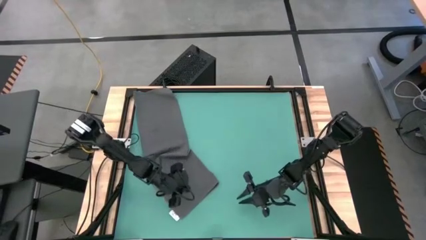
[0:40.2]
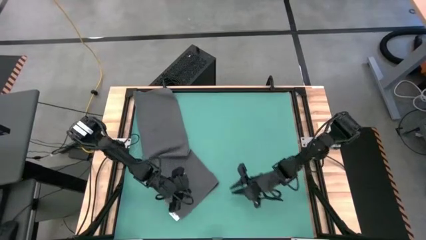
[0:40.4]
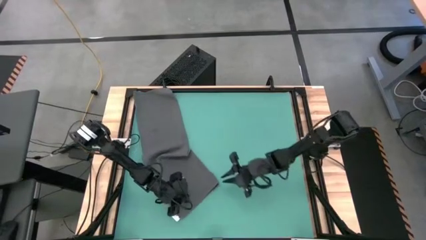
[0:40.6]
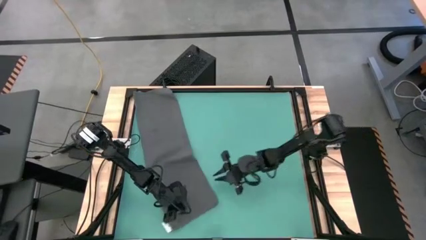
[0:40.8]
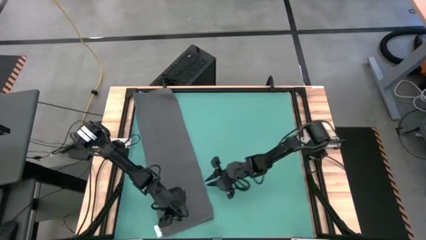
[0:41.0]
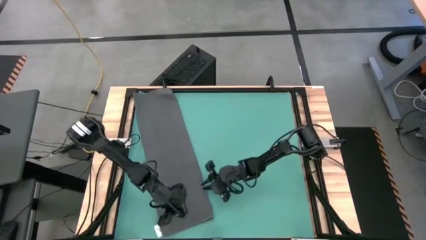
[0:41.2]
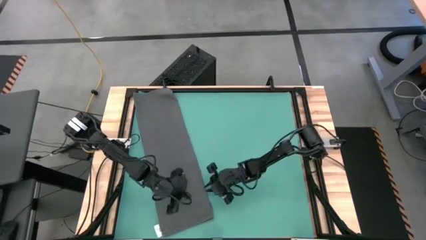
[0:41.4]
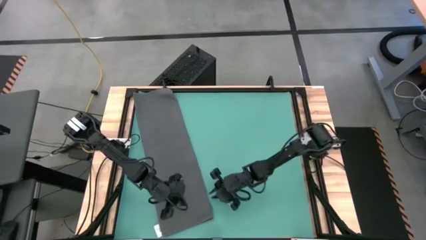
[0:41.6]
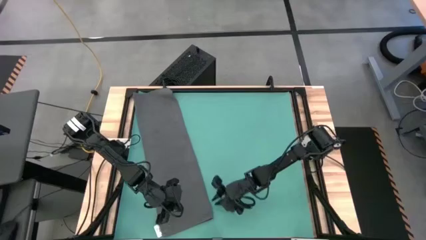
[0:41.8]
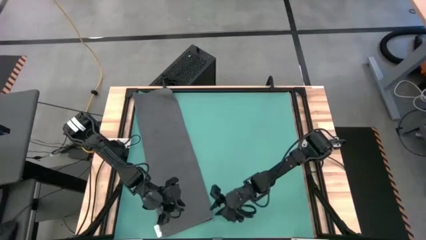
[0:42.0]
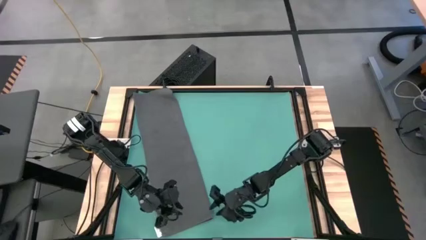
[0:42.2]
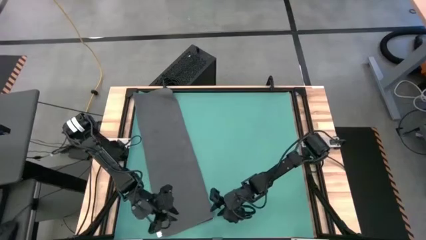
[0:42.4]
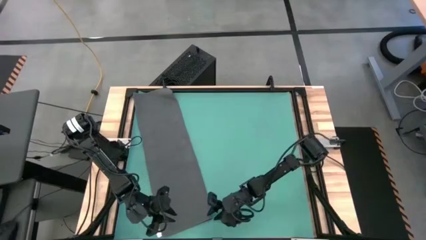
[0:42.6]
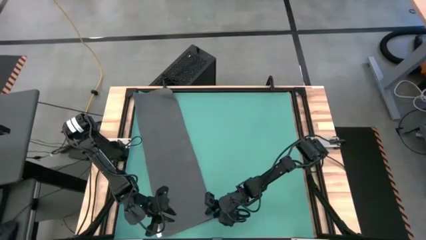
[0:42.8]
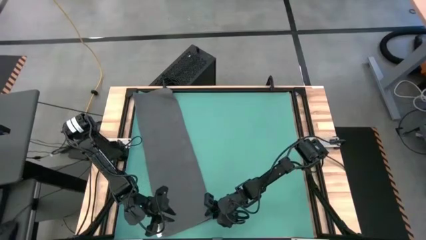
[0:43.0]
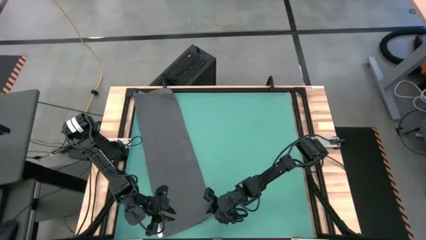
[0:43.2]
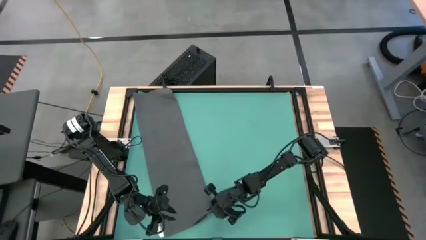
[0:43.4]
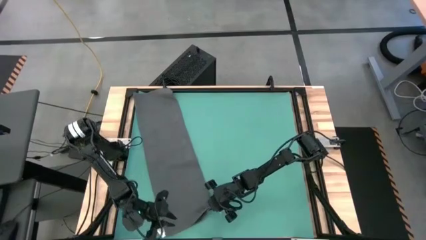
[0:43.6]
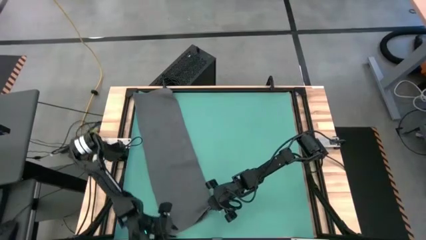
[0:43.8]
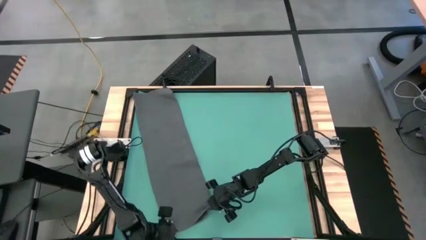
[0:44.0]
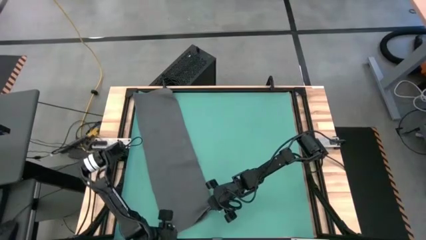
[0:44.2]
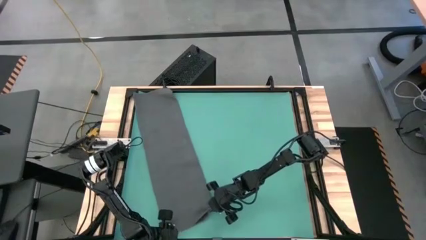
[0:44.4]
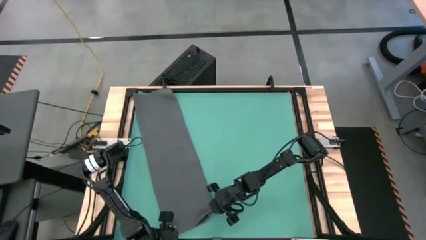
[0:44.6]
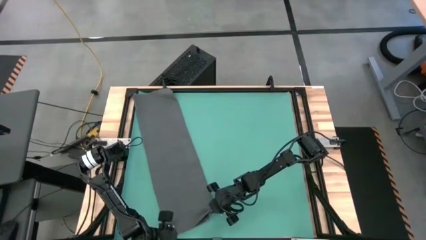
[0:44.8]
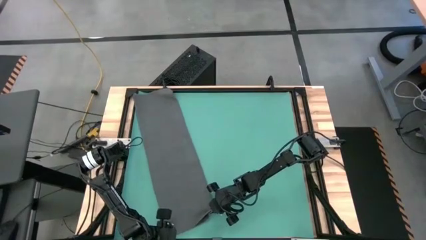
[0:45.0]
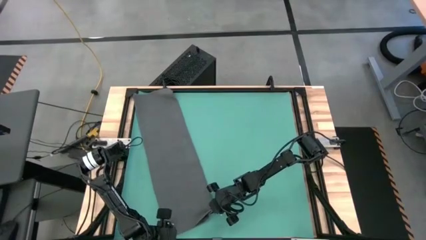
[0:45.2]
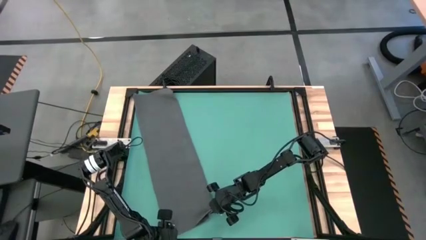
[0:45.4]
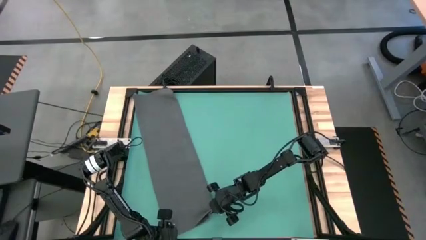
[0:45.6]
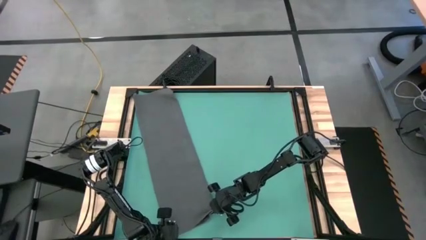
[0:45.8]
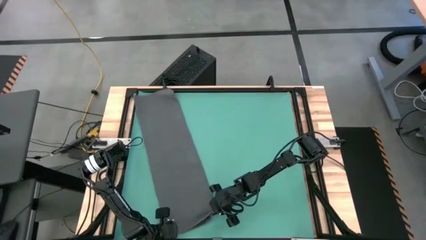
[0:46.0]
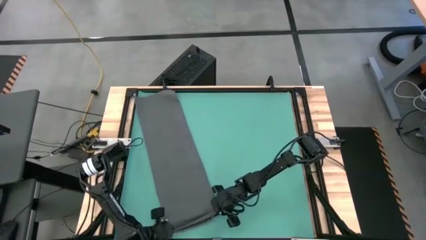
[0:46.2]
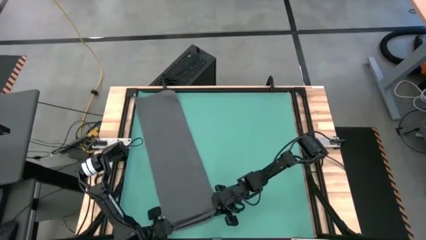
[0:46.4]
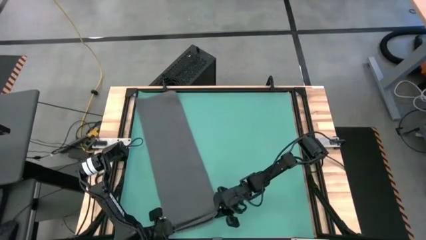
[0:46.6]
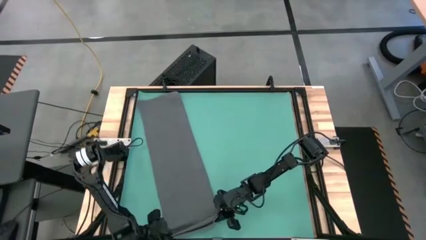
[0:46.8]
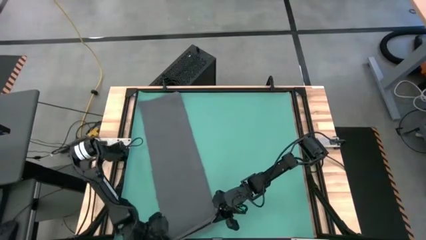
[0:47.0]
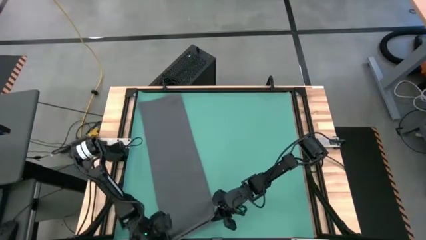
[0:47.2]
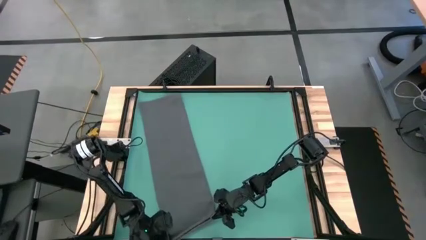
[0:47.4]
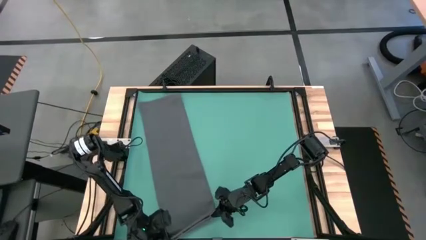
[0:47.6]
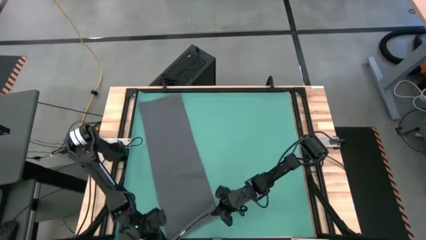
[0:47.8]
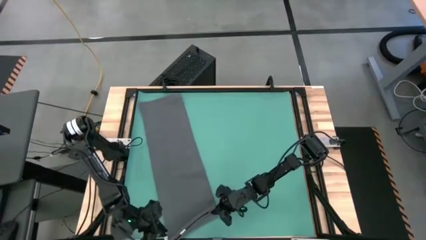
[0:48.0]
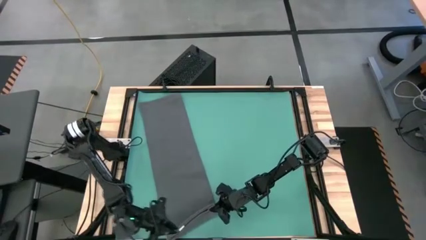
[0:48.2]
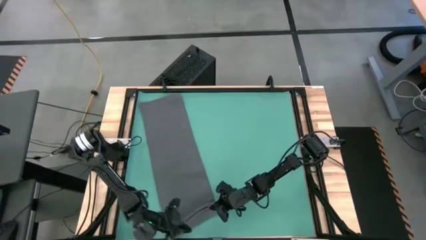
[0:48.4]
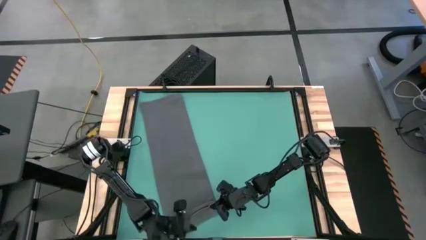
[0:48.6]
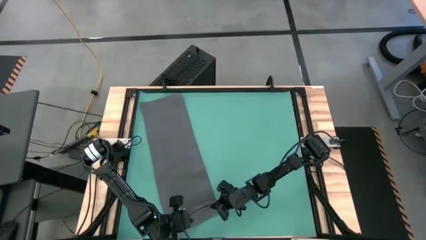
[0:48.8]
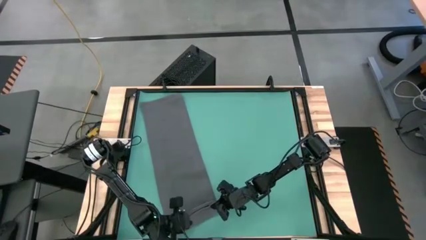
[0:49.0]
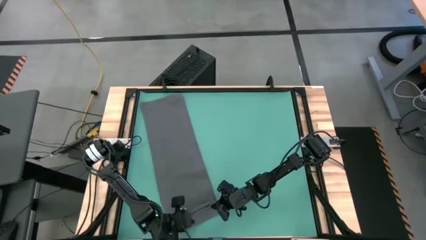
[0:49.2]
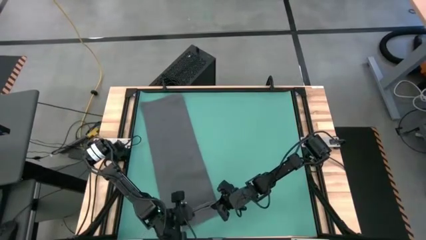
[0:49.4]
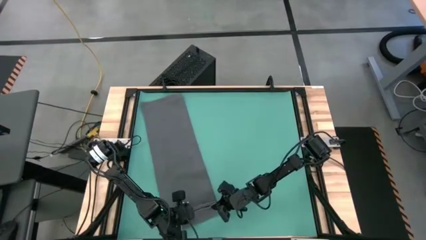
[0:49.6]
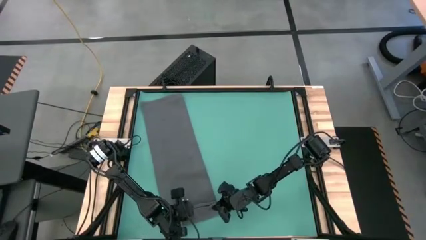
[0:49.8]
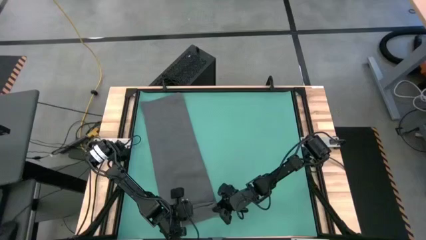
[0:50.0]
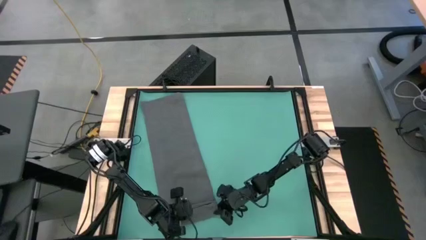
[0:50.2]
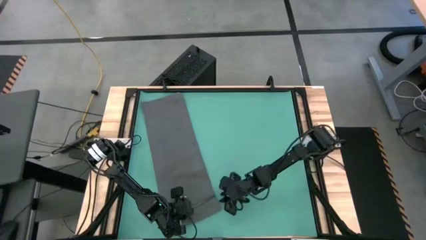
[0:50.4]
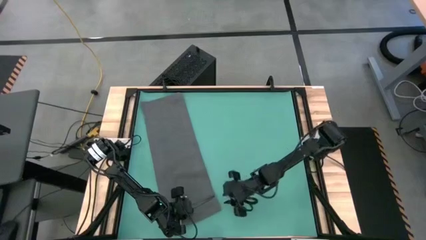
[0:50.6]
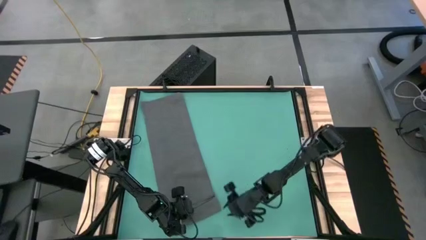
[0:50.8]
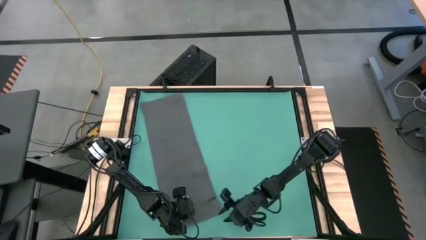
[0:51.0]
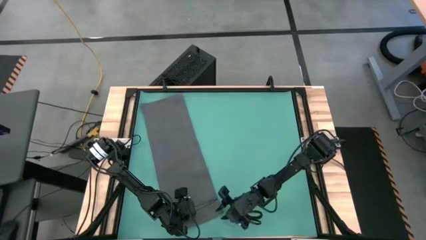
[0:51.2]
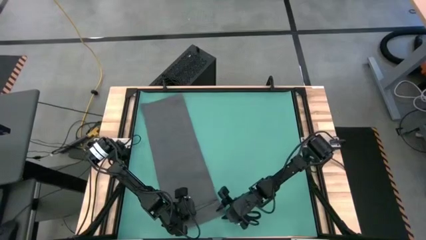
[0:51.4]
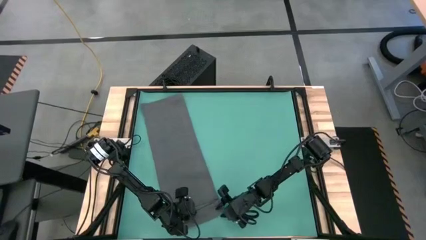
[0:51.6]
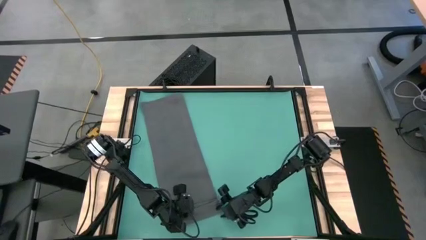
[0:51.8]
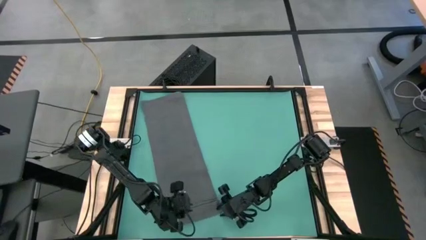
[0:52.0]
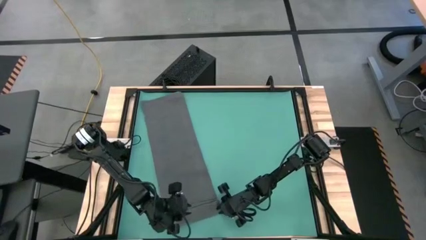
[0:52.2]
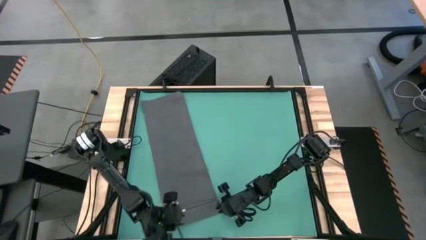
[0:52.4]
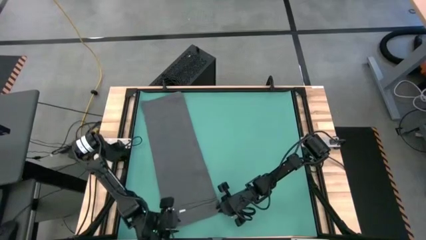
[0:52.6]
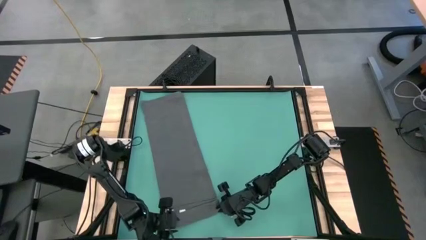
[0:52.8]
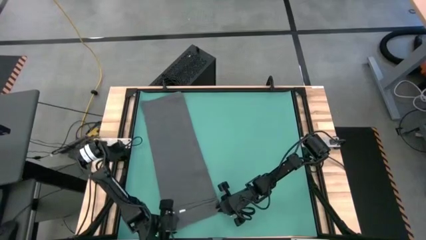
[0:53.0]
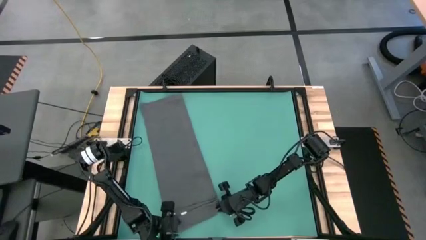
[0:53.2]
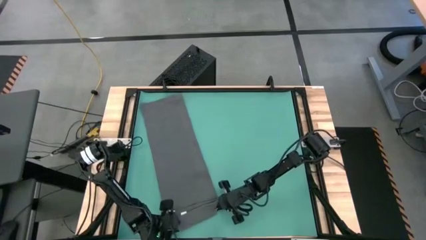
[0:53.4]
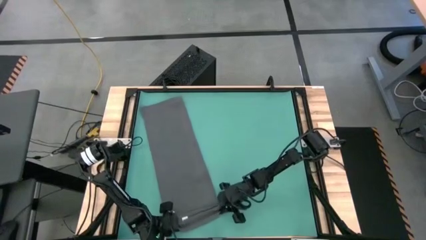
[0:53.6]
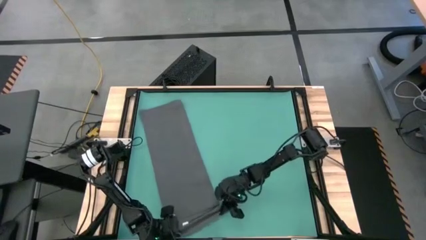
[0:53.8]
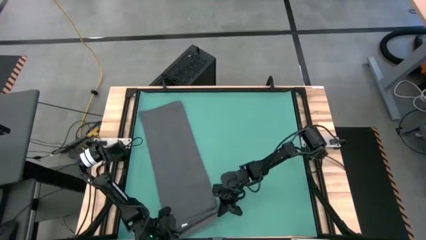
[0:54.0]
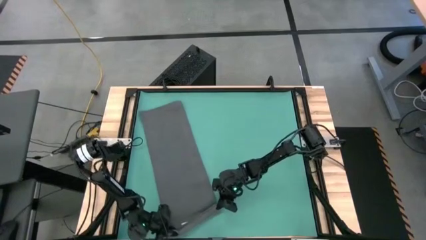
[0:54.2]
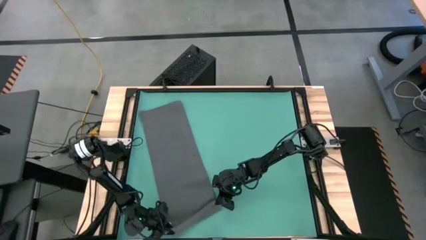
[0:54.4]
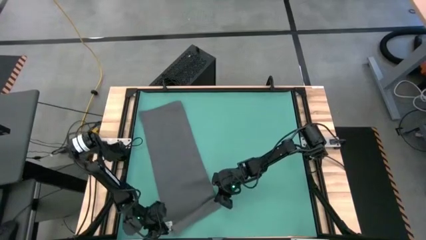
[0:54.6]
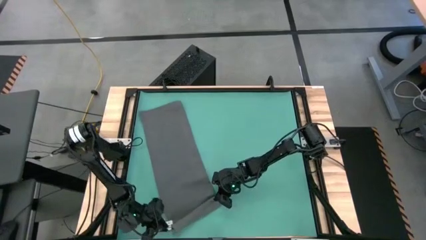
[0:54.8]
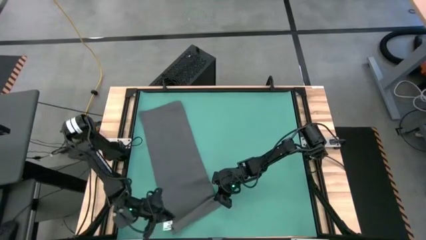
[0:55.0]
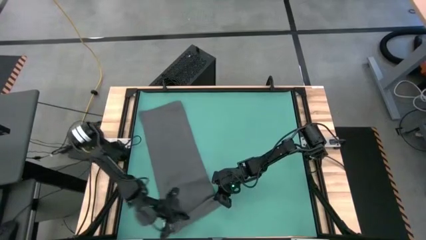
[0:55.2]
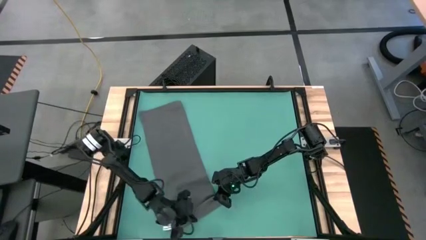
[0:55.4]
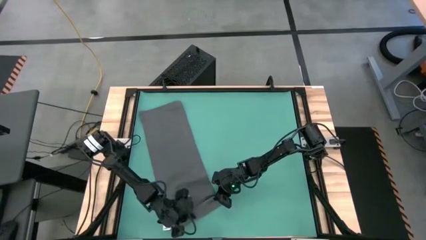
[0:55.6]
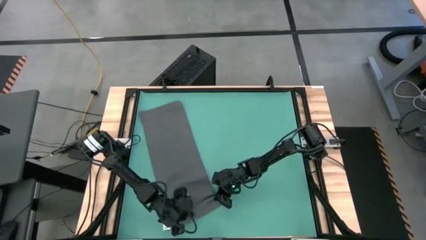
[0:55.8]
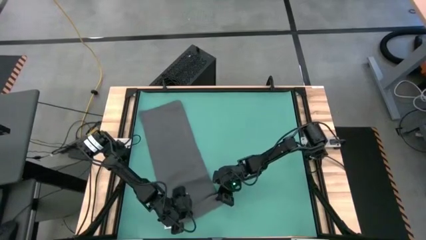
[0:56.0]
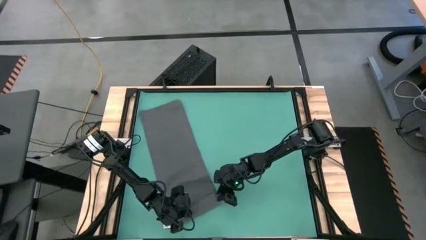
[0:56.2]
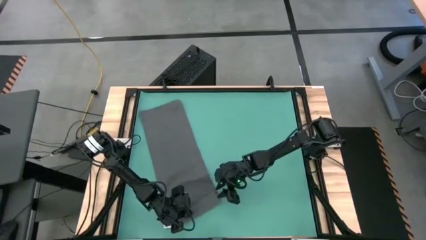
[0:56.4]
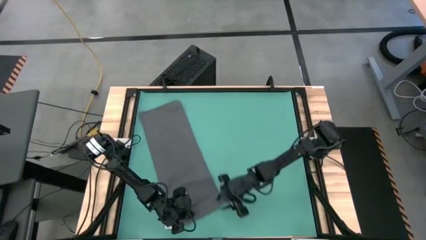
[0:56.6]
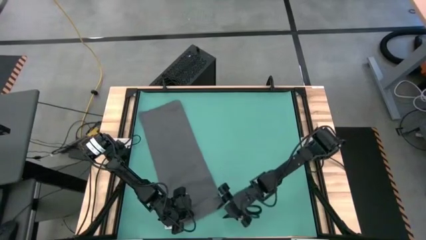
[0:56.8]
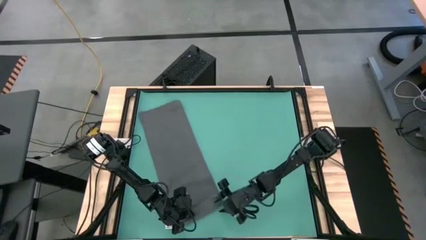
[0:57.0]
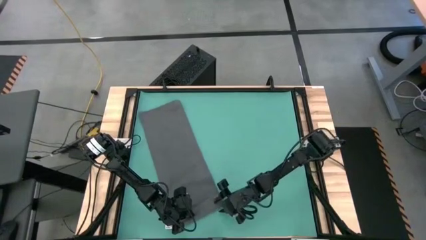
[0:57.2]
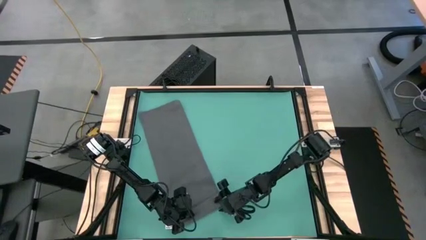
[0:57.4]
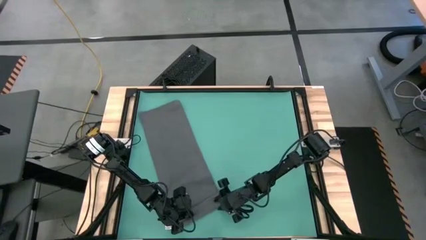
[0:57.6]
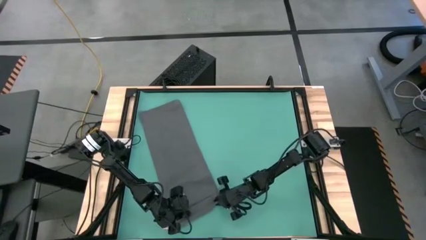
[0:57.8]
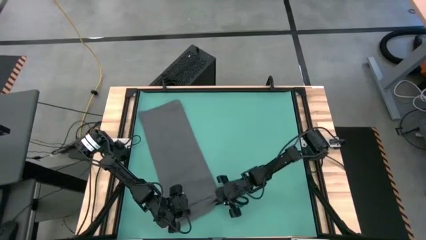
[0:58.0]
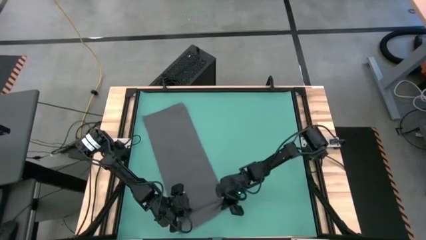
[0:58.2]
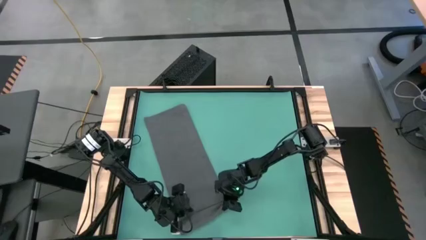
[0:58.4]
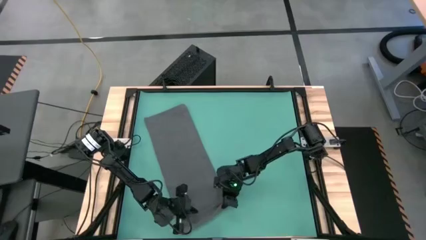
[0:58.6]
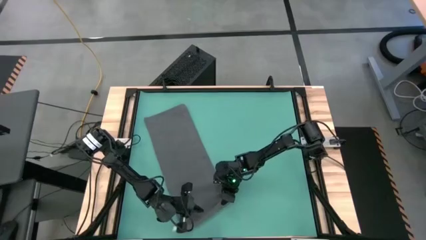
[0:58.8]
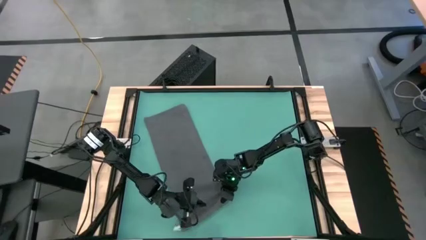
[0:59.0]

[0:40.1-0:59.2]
Task: Roll towel
Roll the gray towel
